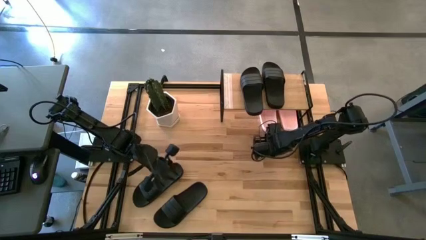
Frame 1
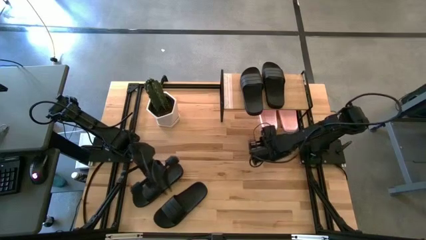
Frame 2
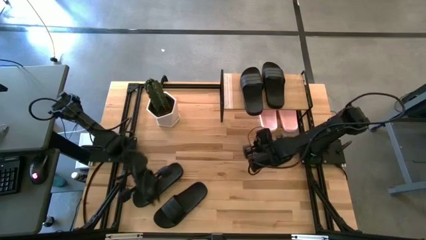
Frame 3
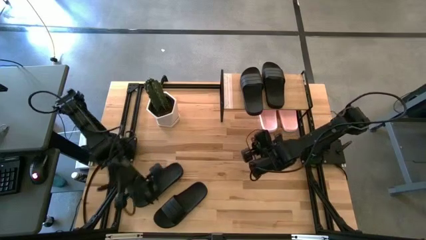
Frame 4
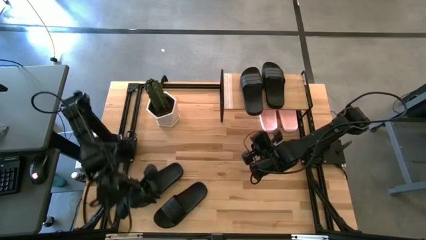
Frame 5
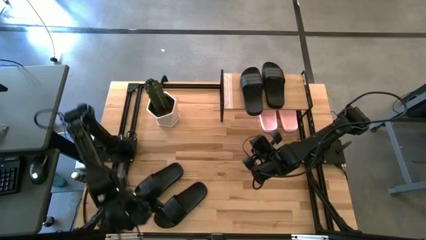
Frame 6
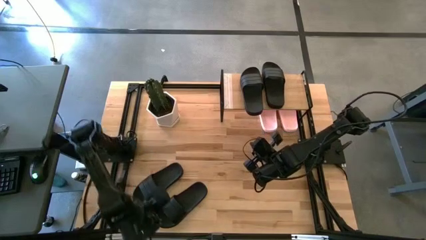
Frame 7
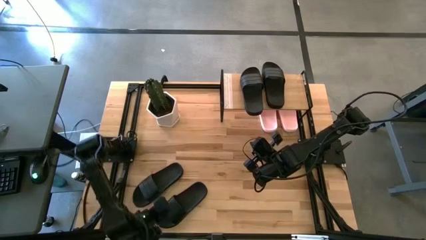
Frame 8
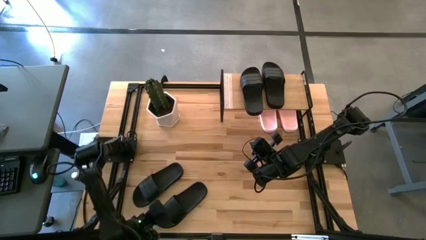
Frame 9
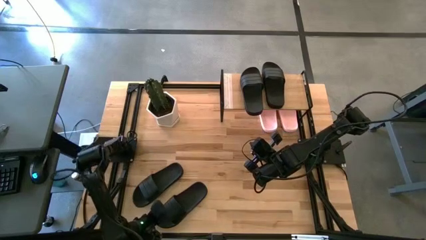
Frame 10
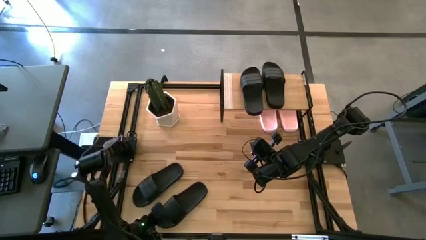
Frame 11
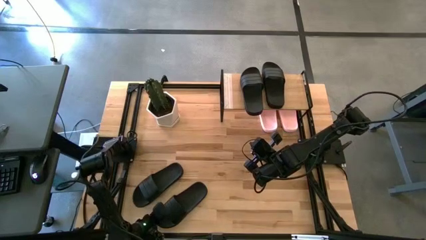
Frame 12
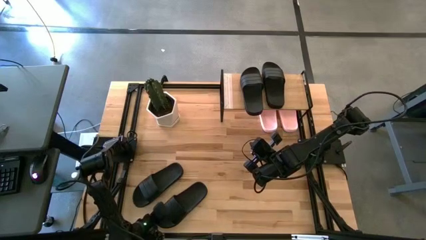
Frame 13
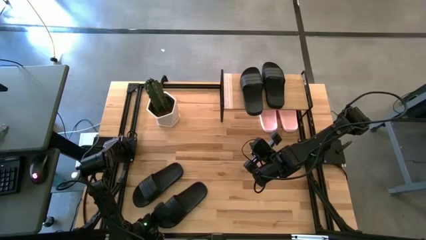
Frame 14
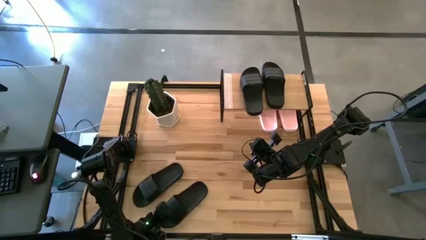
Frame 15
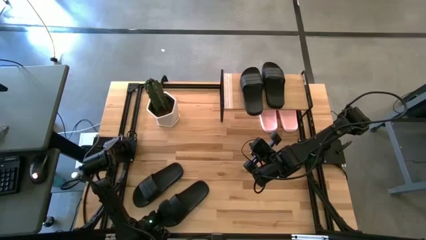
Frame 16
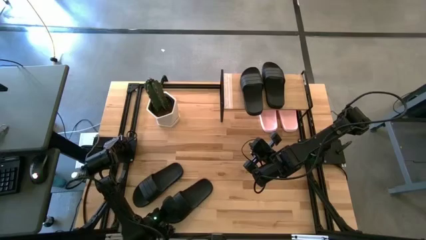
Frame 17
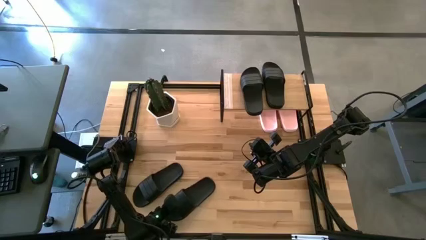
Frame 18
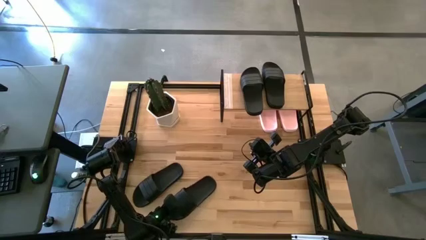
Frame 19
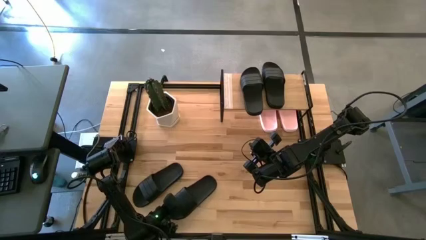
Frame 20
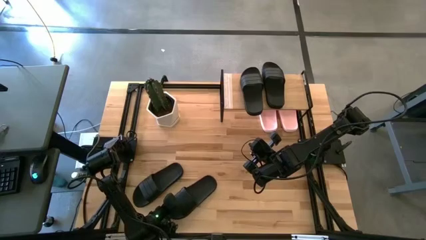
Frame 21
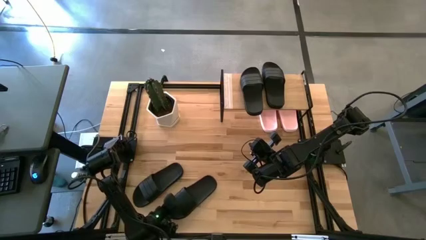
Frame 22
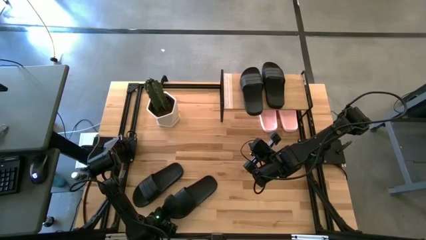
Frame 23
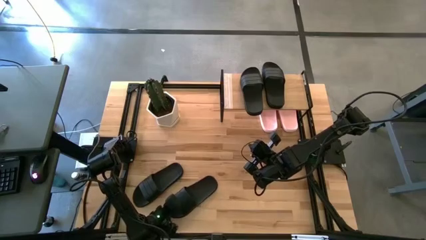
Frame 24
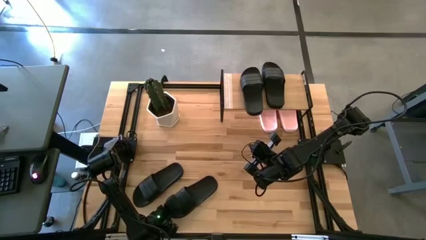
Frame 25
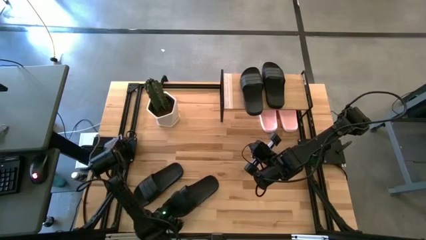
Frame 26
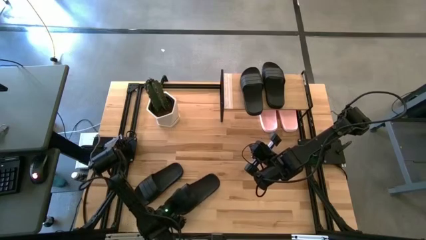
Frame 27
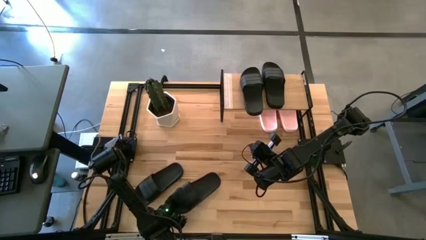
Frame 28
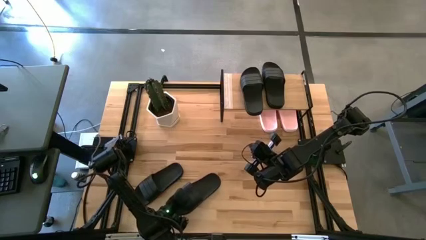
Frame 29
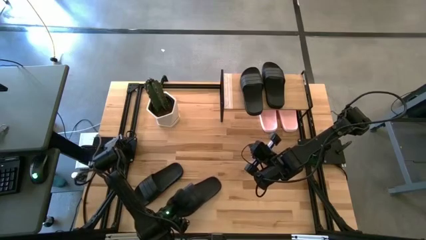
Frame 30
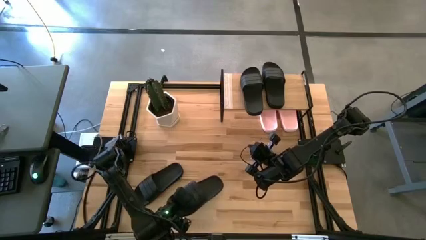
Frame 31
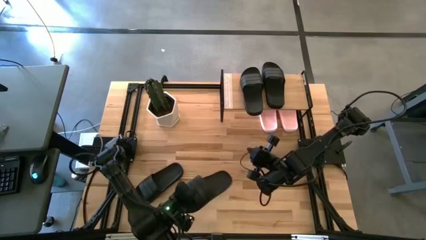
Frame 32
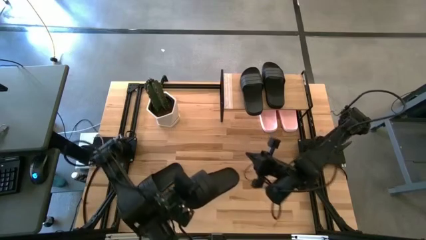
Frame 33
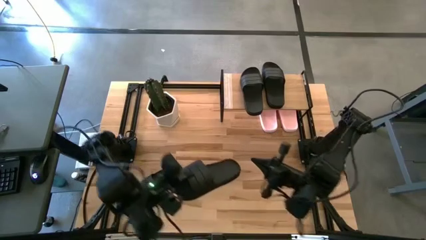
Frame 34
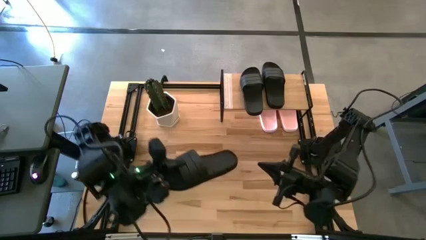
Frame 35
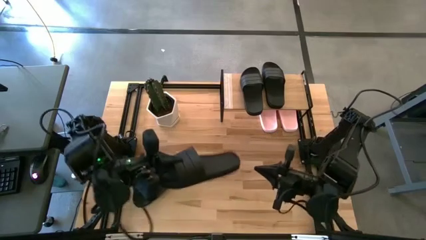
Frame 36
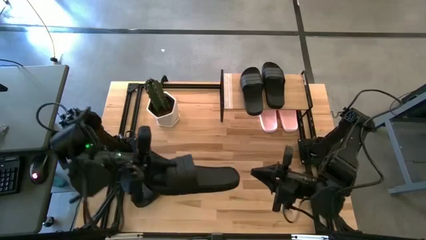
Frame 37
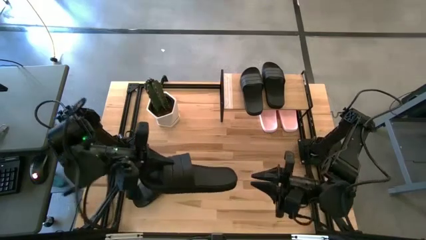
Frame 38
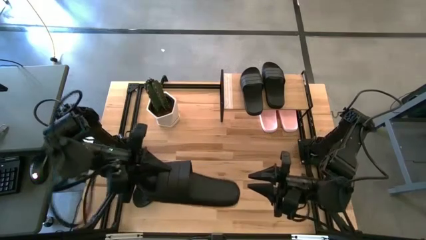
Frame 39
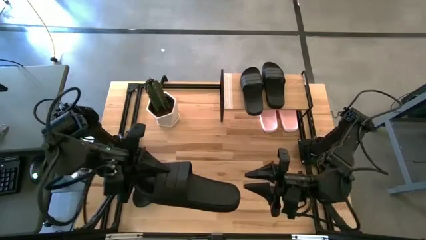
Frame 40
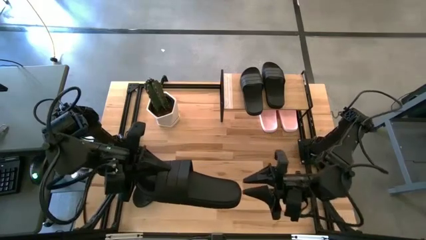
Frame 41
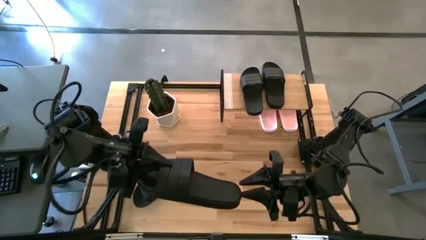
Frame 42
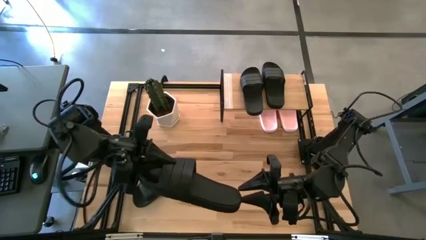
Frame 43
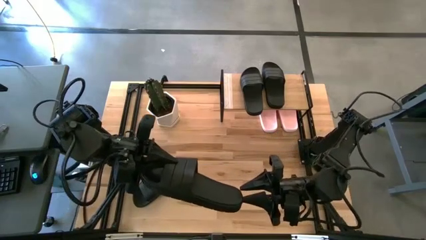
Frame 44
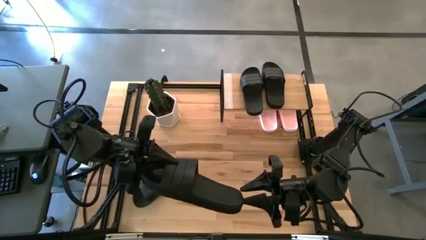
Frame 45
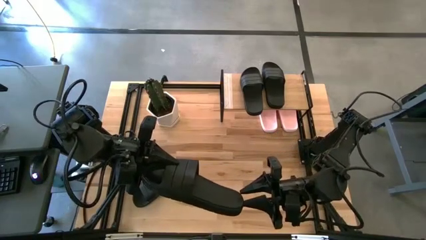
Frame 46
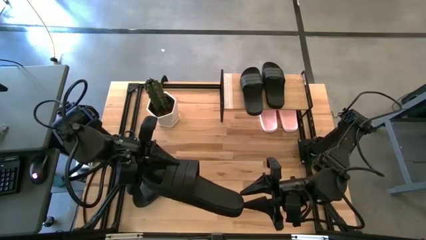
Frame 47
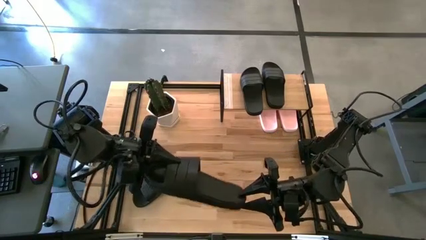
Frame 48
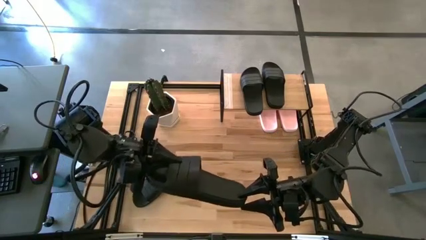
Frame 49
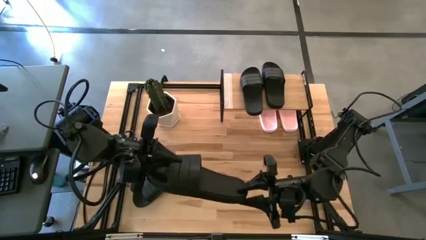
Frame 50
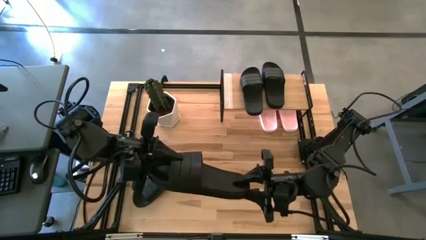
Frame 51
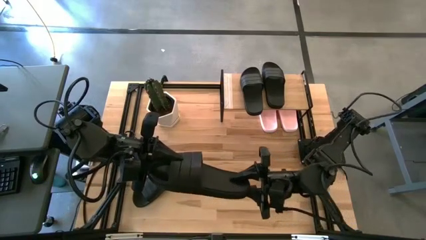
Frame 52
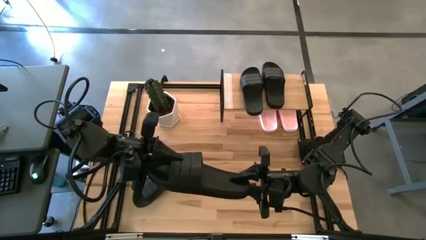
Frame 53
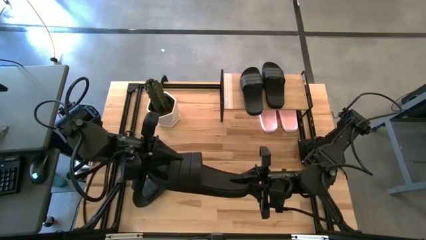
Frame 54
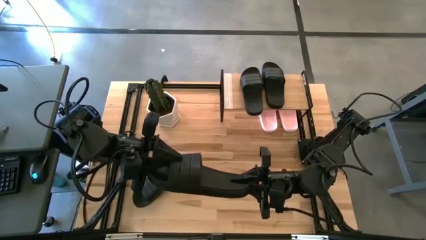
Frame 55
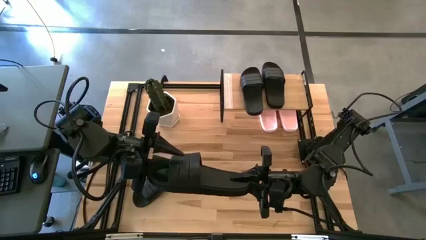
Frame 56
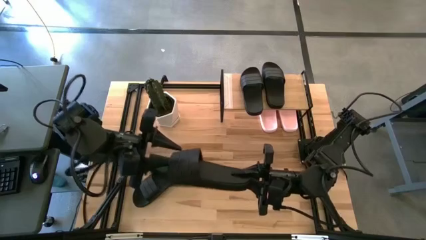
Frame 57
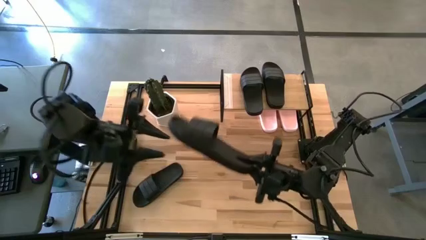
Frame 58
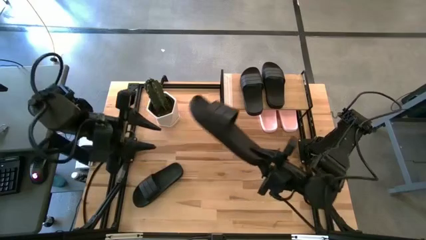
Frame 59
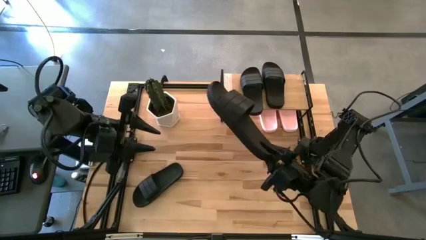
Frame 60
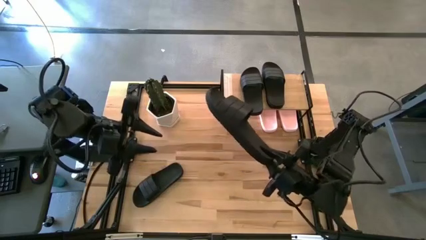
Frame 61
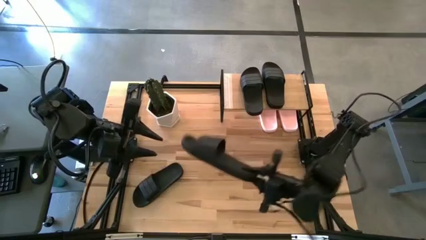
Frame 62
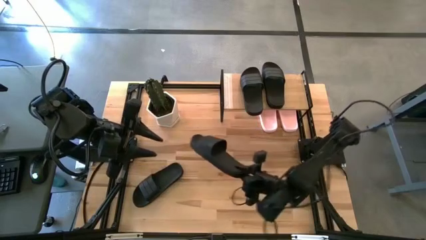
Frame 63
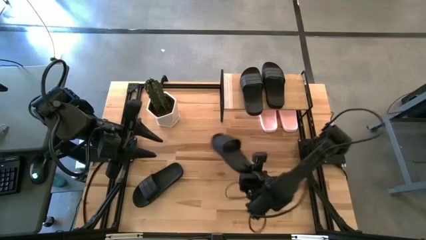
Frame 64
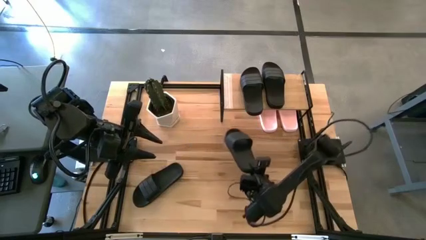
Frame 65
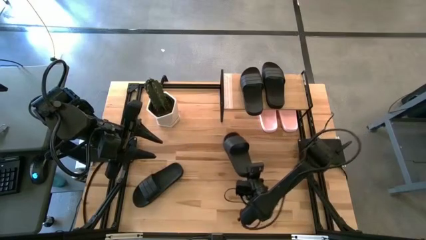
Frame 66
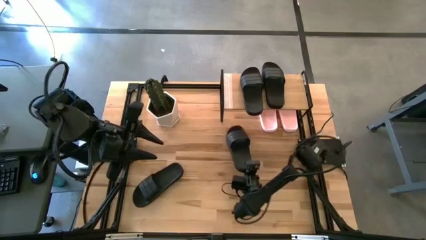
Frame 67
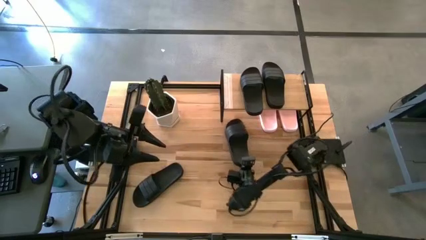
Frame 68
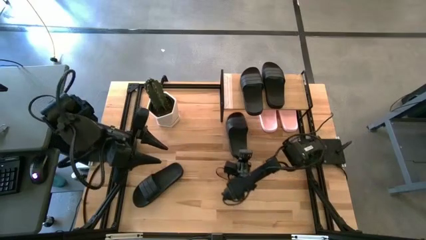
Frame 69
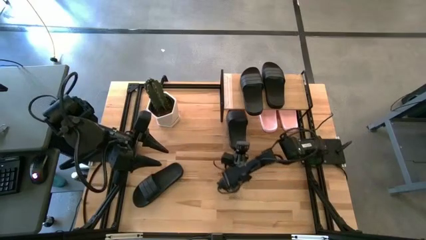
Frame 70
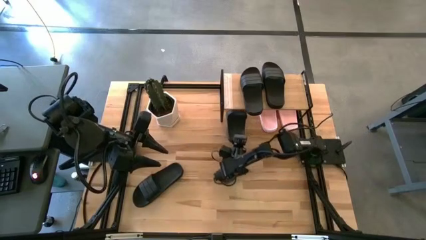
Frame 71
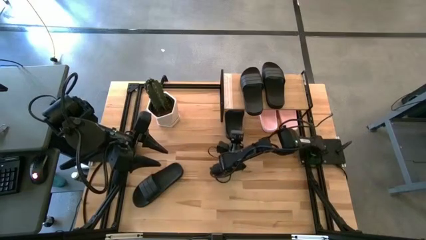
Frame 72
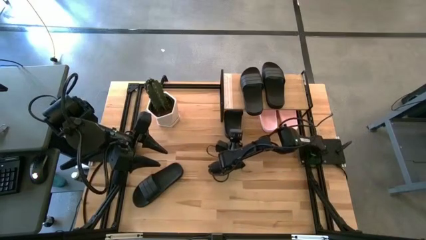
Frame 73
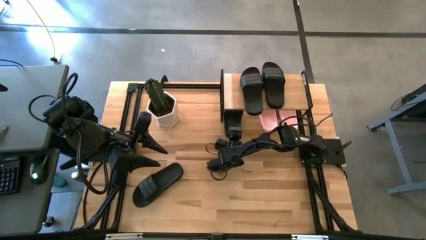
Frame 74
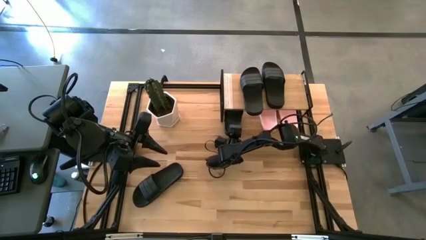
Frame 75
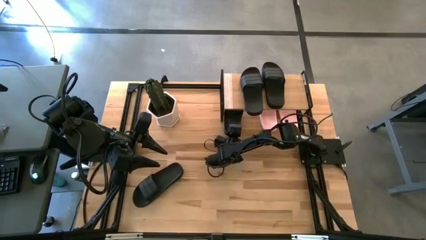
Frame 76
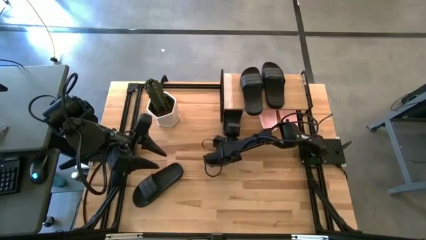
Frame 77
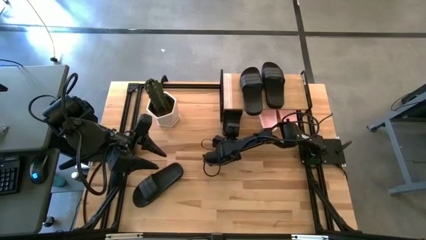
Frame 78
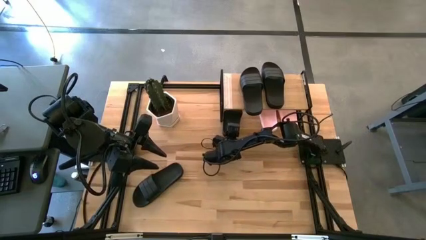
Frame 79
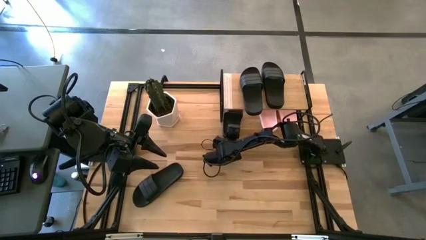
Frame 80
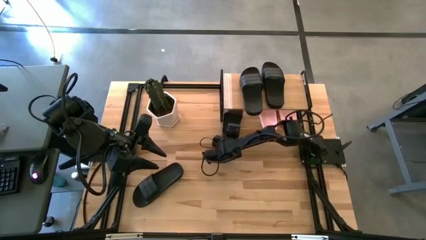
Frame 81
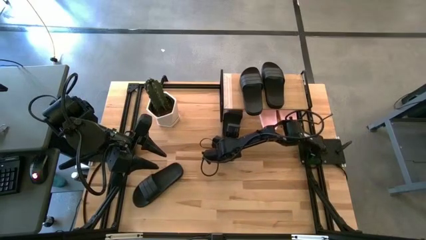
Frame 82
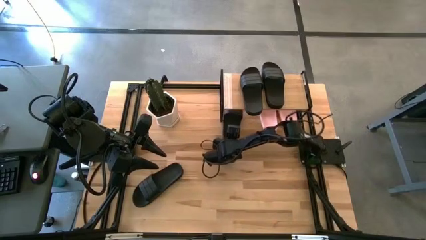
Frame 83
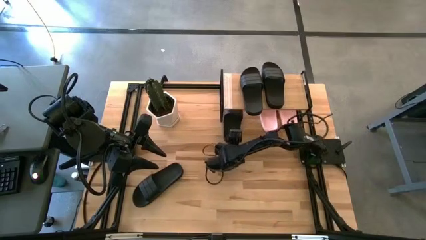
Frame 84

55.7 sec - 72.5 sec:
Task: Pick and place slides into the shelf
Put the black slipper under the shelf
